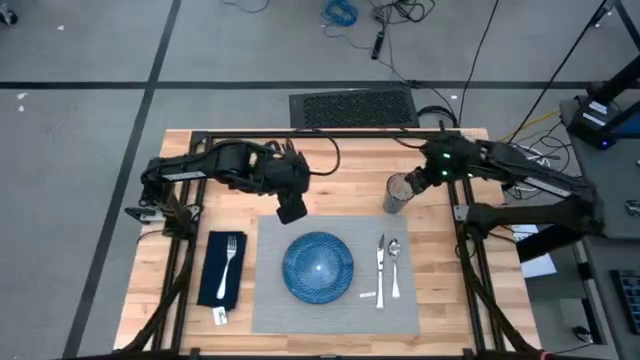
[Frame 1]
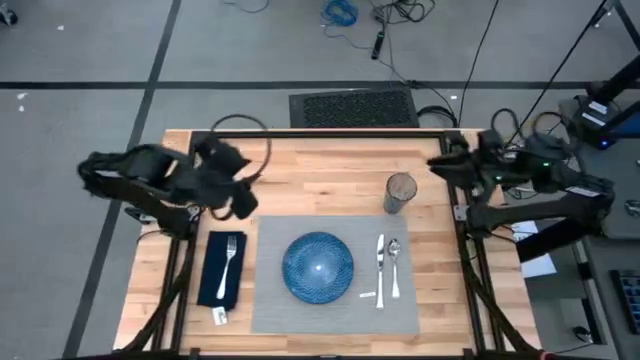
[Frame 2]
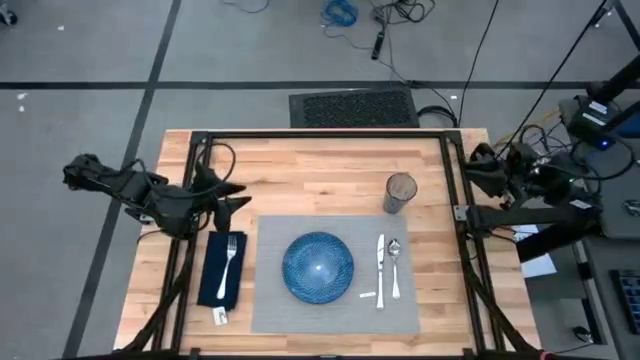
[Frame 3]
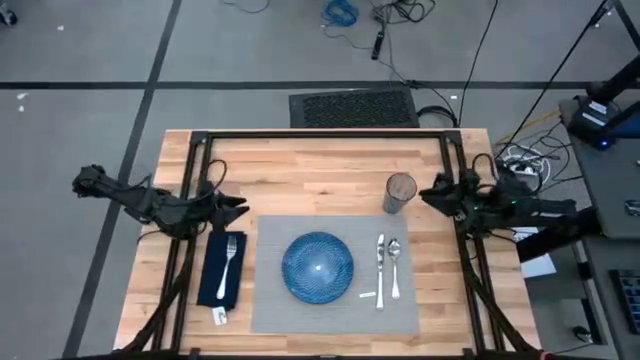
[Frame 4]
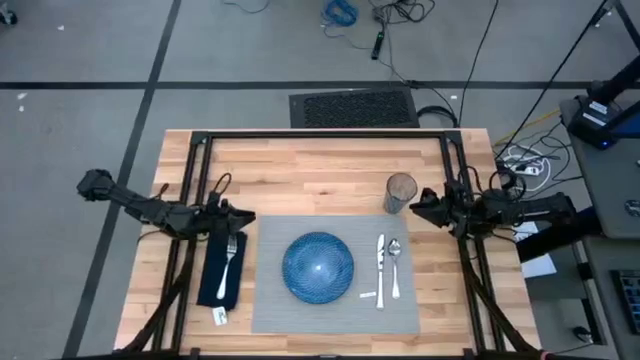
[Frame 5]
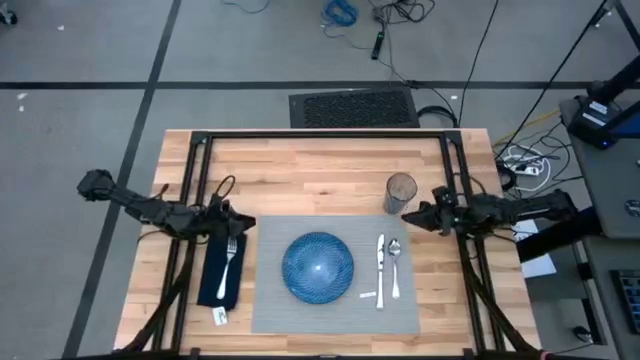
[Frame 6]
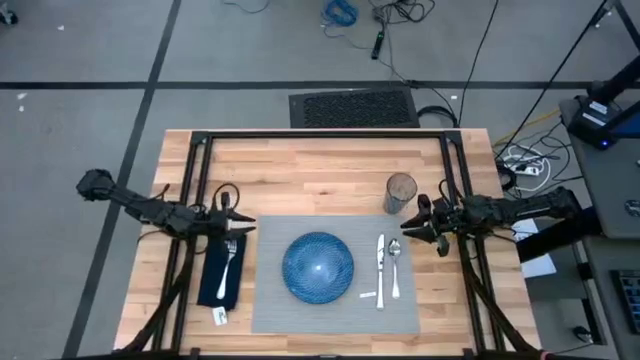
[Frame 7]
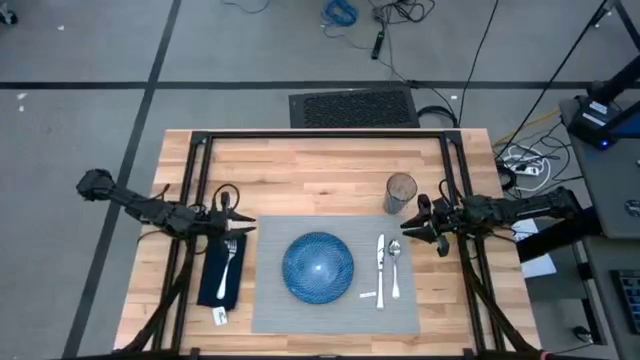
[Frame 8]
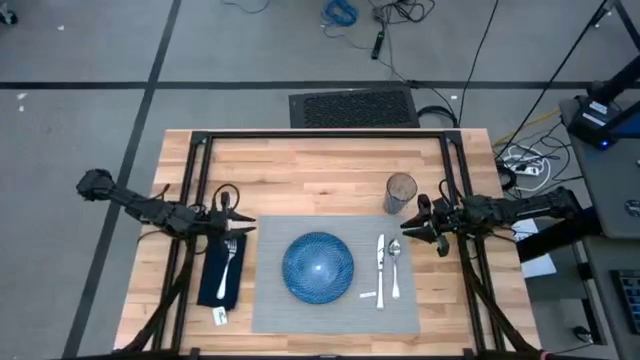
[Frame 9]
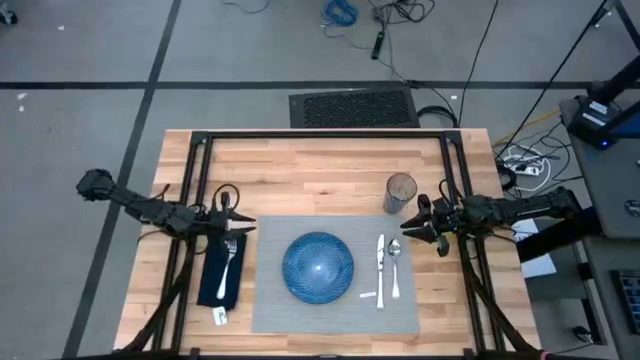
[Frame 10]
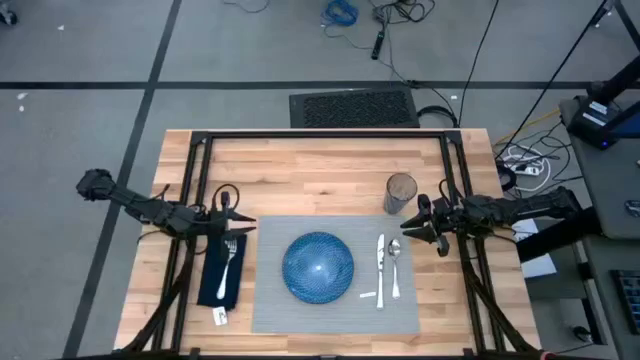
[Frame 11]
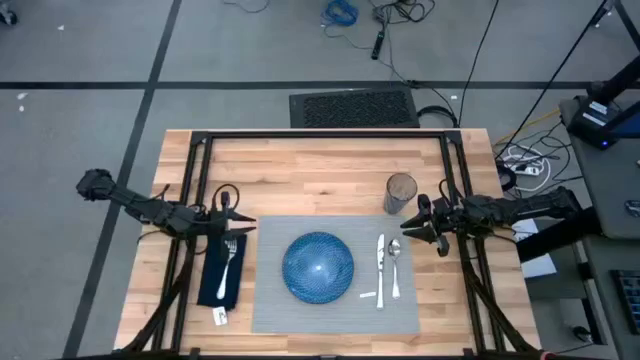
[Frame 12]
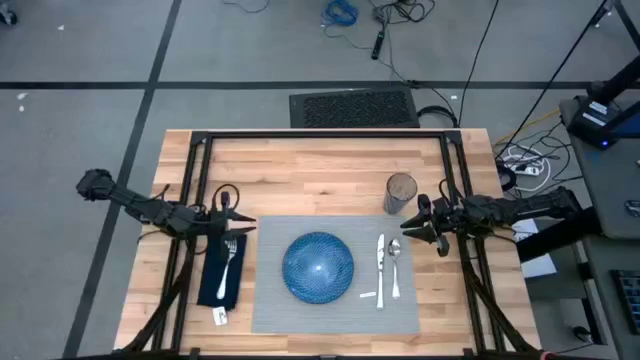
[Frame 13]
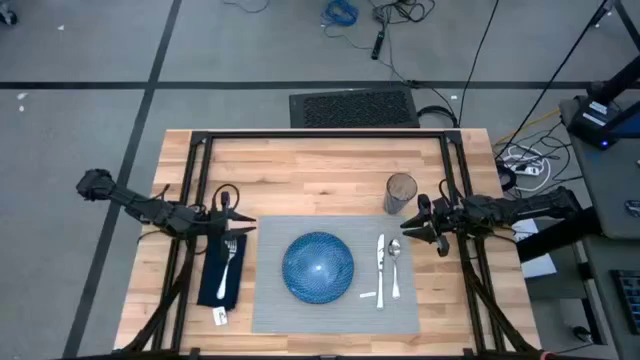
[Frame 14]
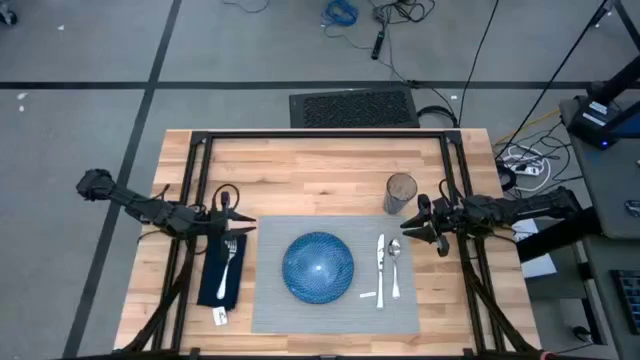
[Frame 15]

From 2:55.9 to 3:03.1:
Task: Set table place
Return to Home Position

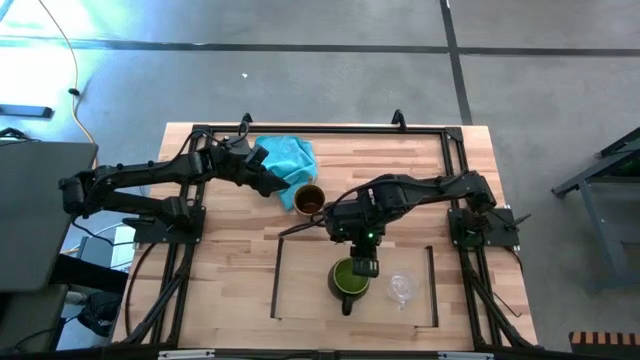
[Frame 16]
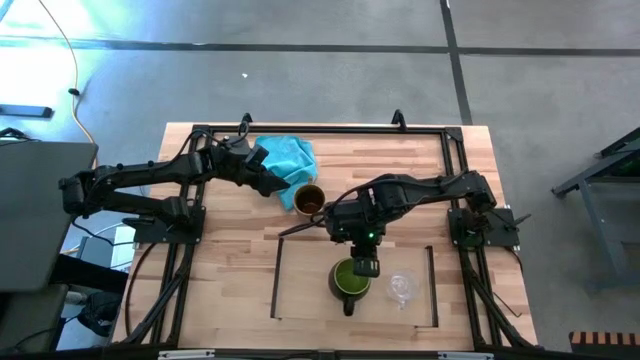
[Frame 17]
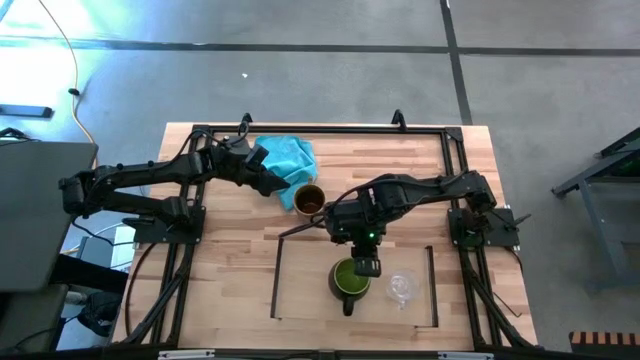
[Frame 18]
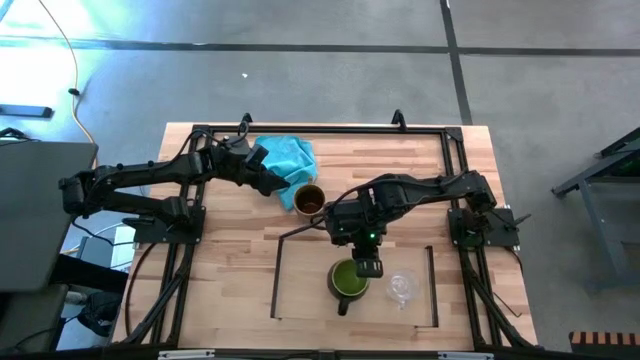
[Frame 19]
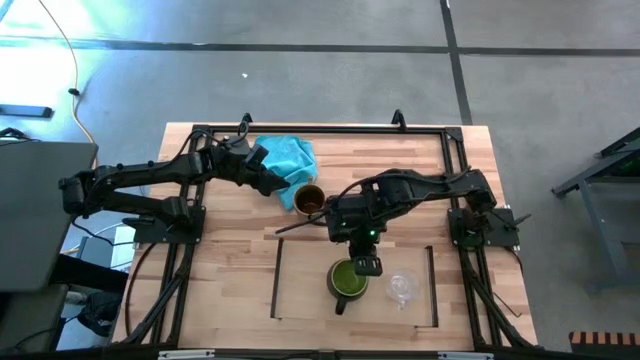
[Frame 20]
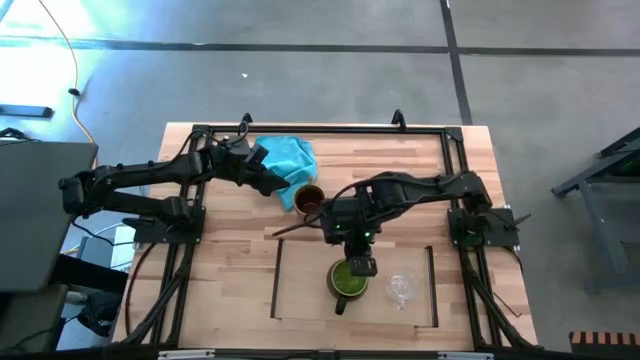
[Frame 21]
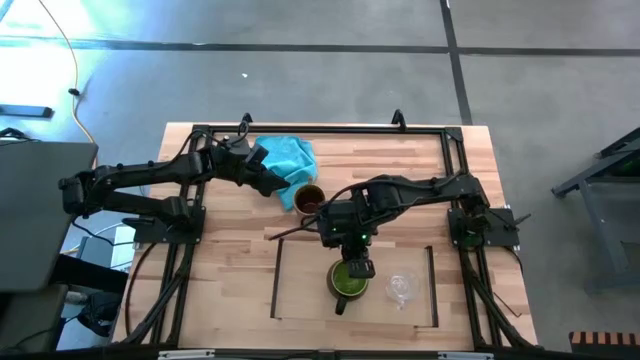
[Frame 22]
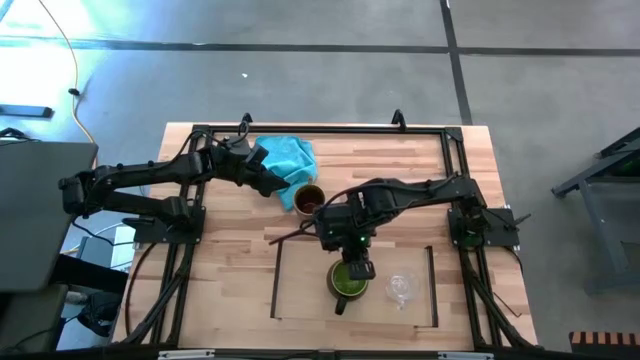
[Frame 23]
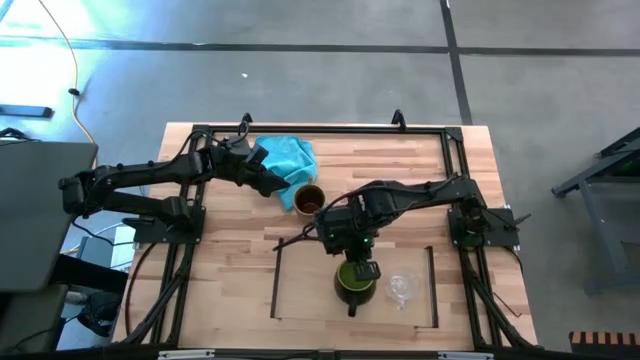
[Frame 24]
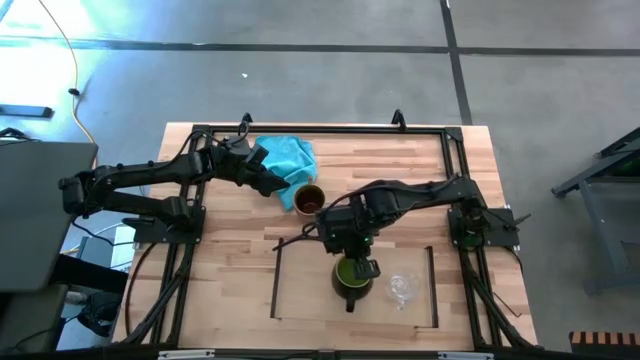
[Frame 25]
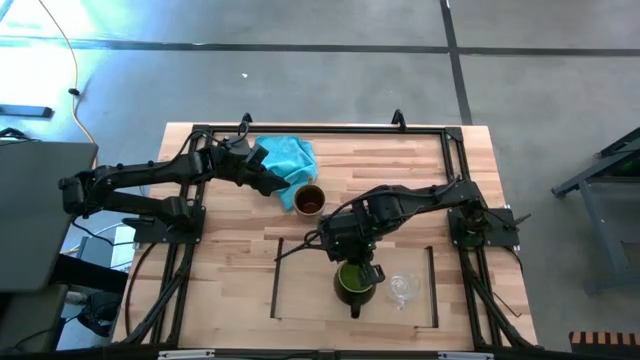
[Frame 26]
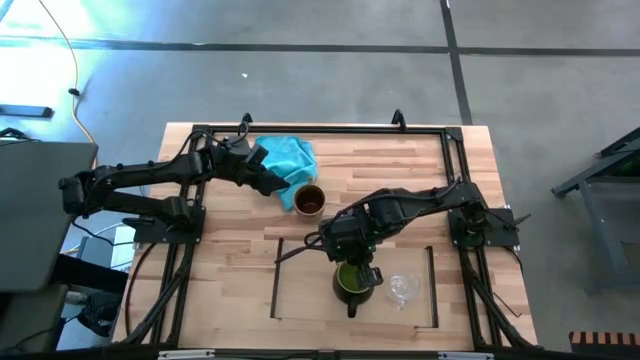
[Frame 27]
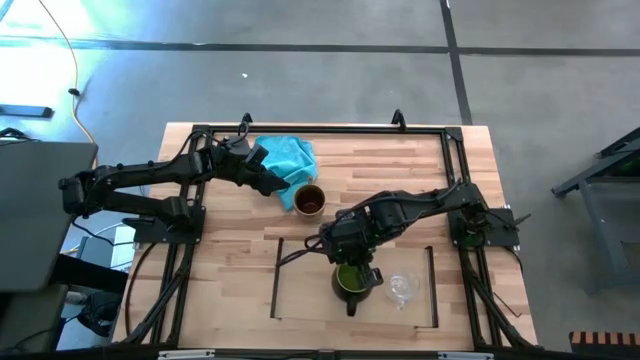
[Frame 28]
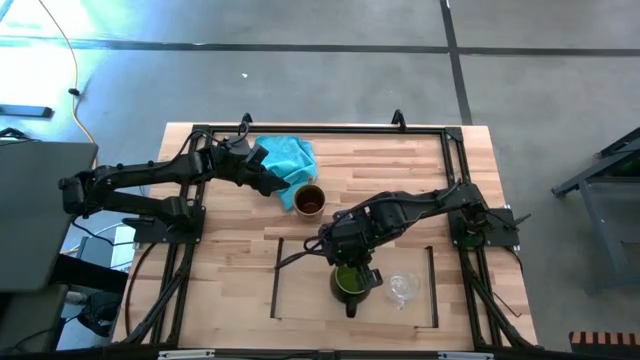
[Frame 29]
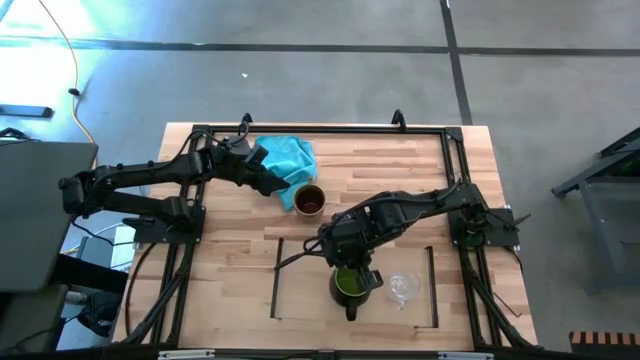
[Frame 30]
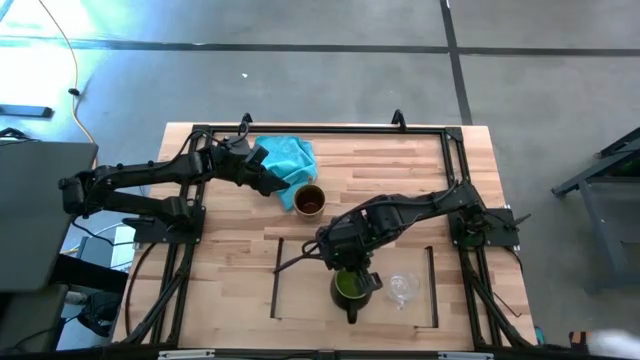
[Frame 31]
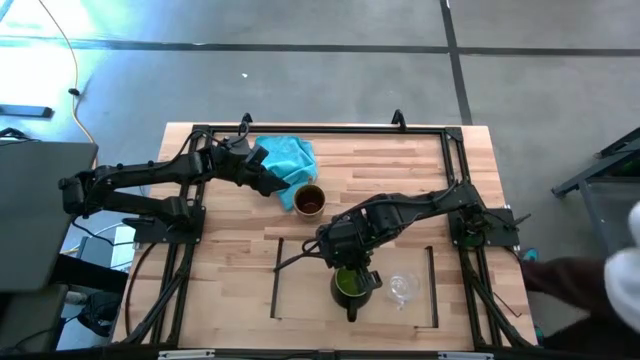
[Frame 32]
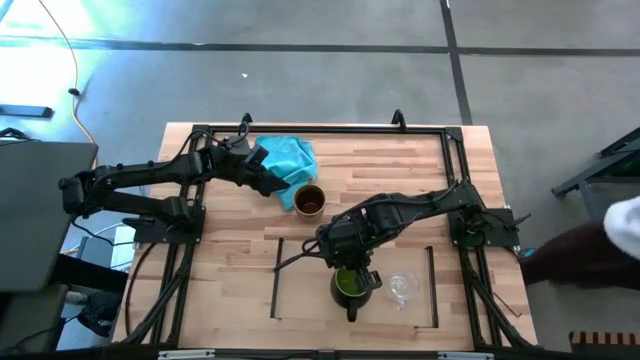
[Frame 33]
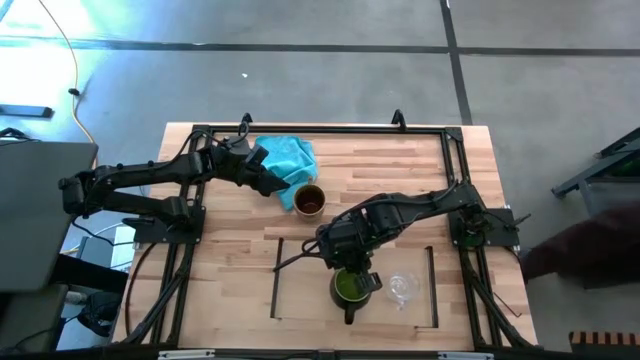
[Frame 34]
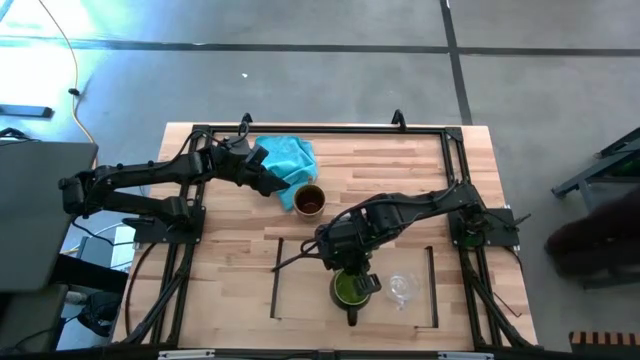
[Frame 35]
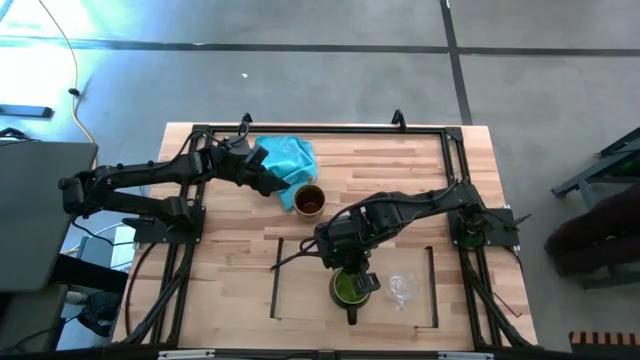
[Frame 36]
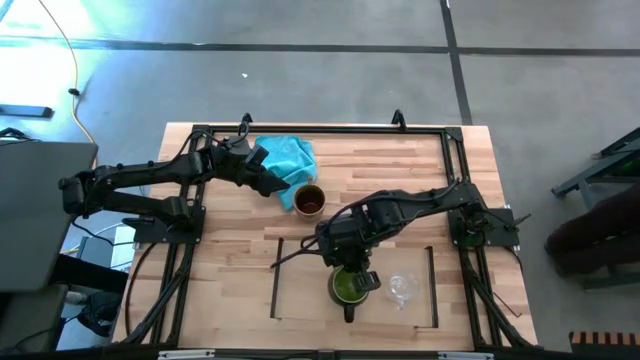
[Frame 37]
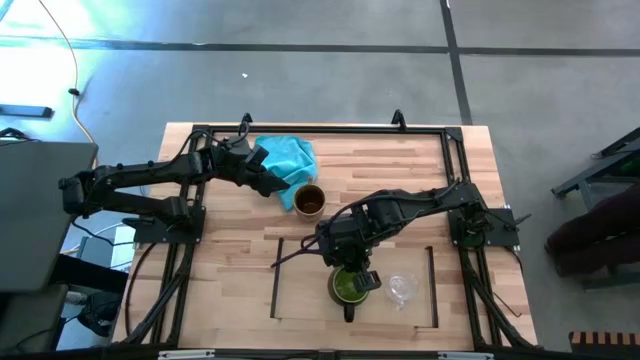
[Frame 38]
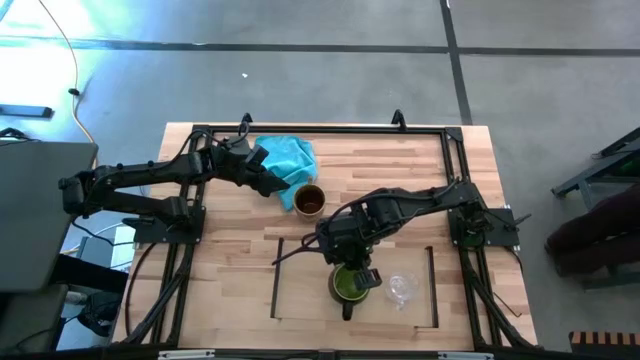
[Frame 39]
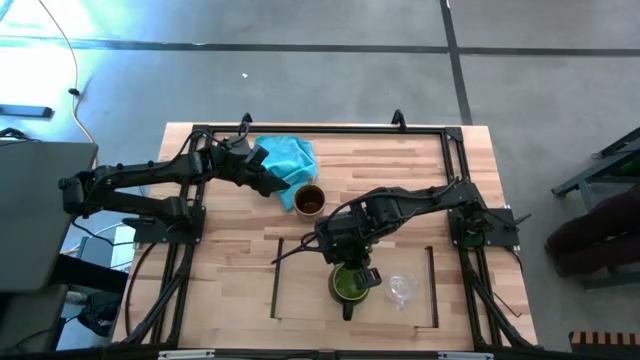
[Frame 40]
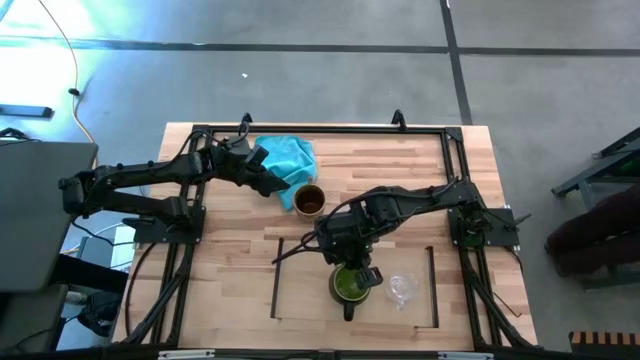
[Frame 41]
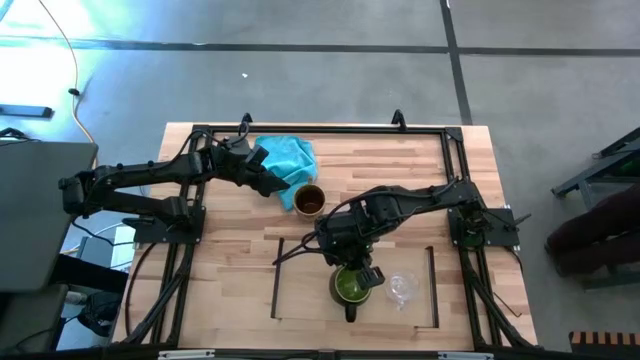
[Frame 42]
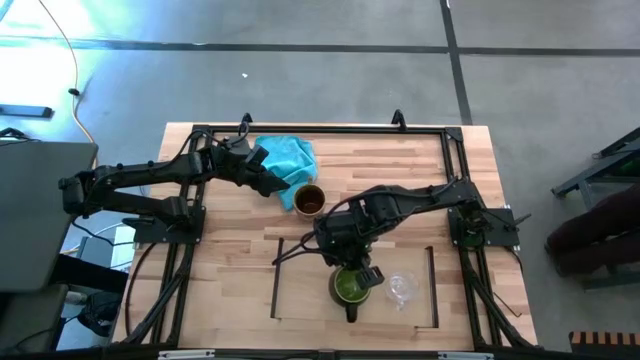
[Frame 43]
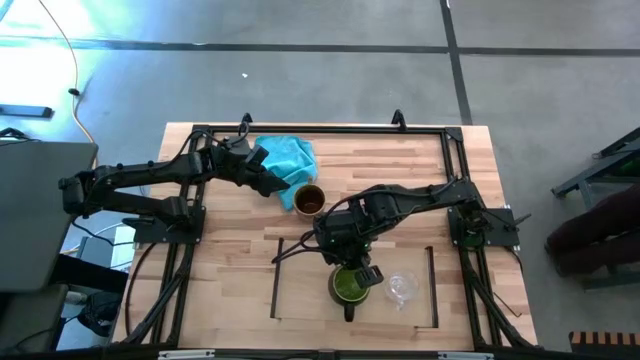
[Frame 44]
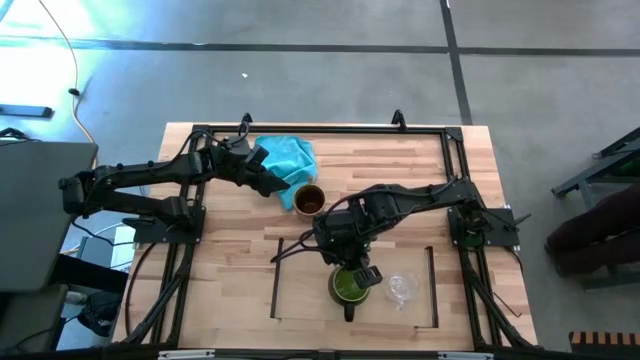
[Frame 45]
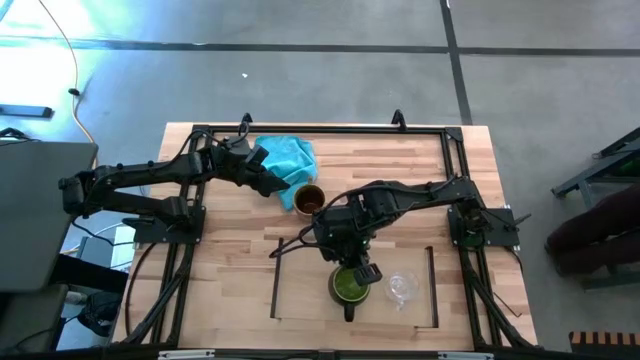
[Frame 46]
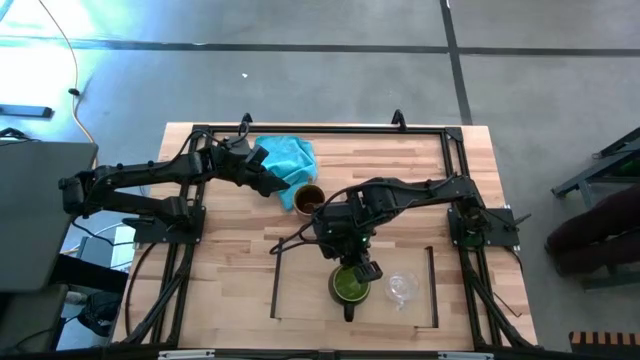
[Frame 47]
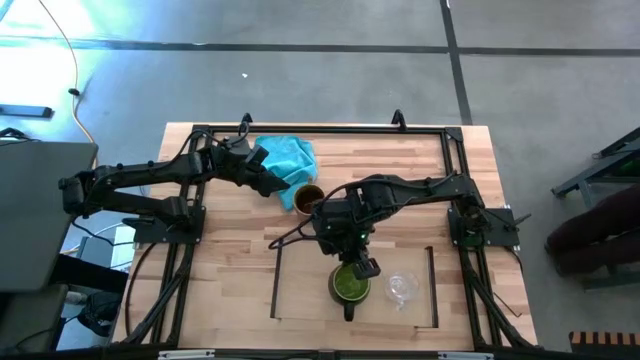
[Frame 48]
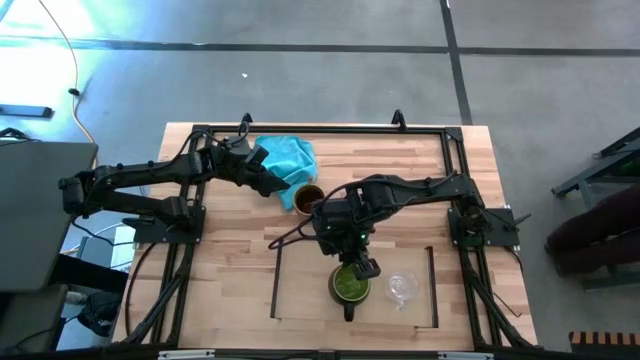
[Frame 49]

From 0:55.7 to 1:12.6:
Task: Stack small to large cups/mugs on shelf
Put the black mug on the shelf
